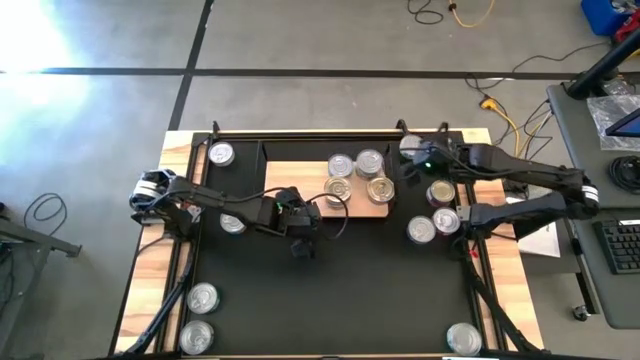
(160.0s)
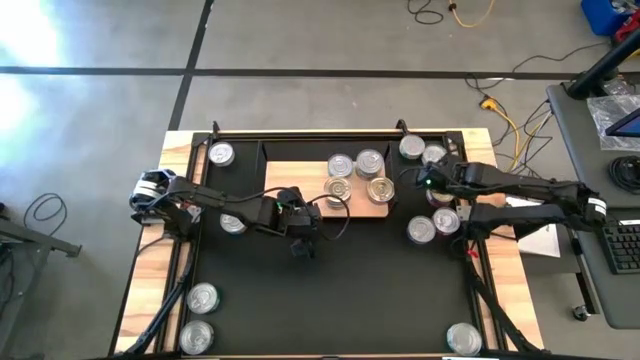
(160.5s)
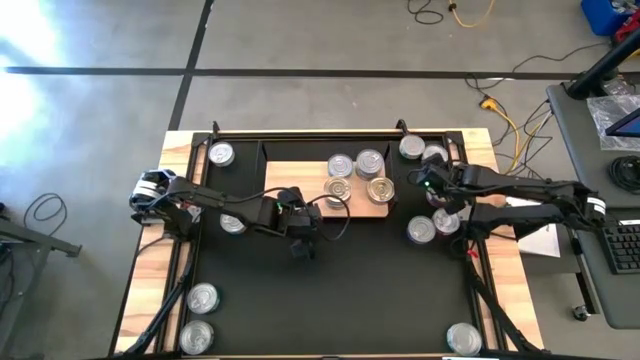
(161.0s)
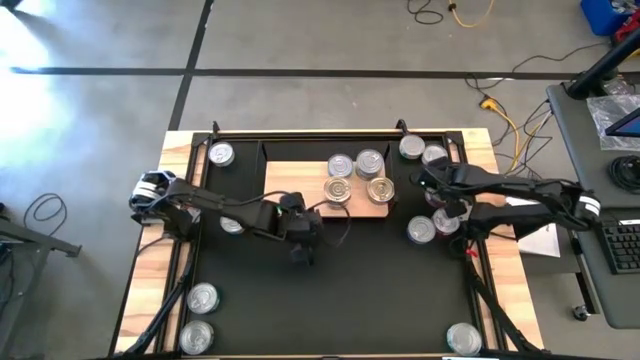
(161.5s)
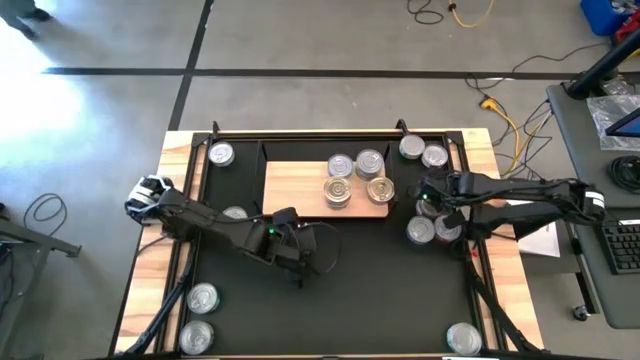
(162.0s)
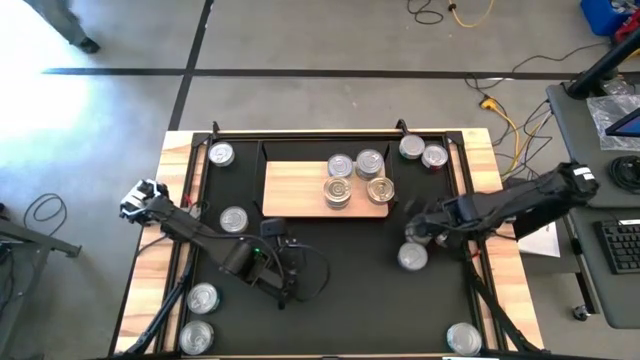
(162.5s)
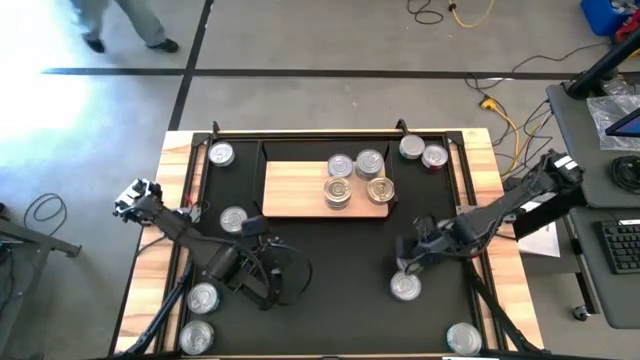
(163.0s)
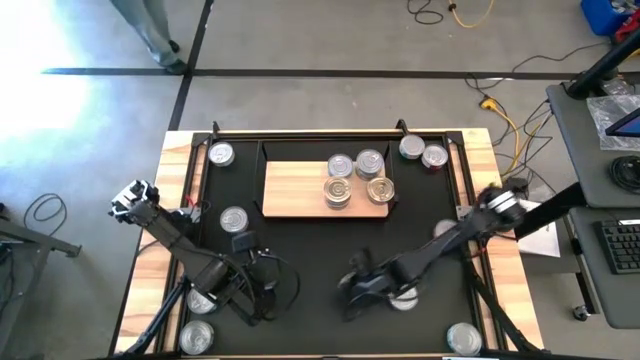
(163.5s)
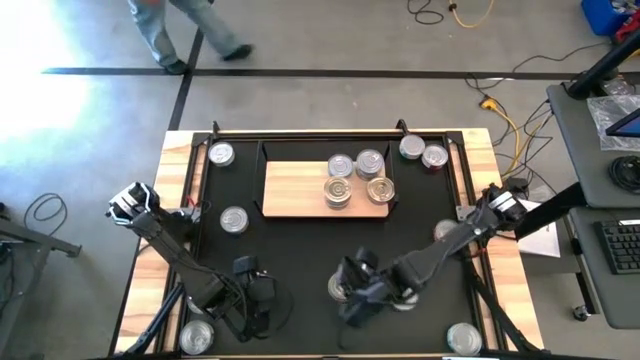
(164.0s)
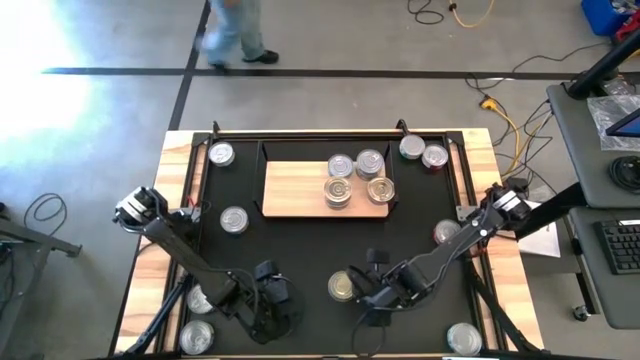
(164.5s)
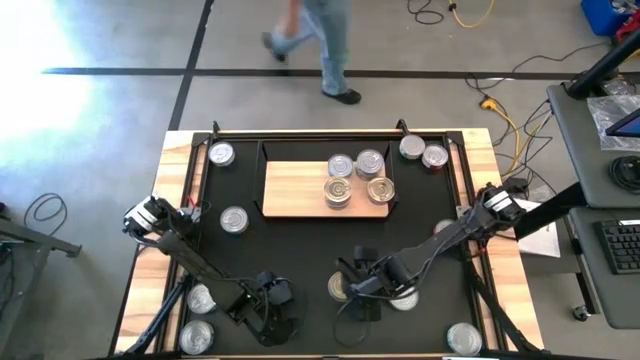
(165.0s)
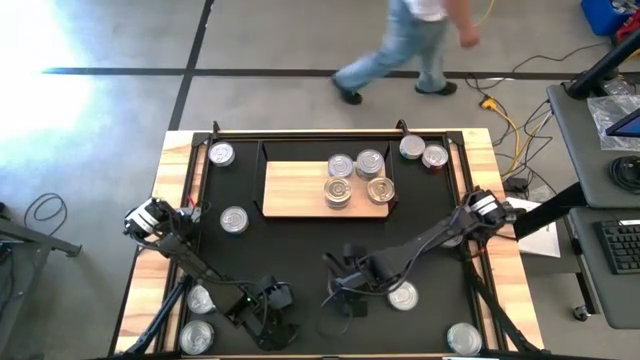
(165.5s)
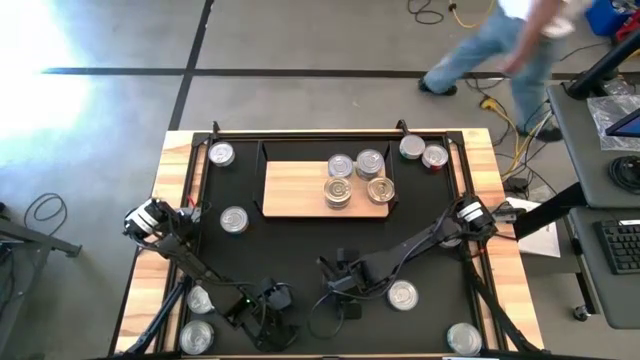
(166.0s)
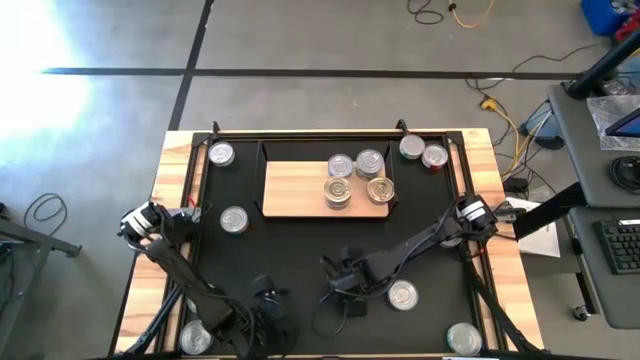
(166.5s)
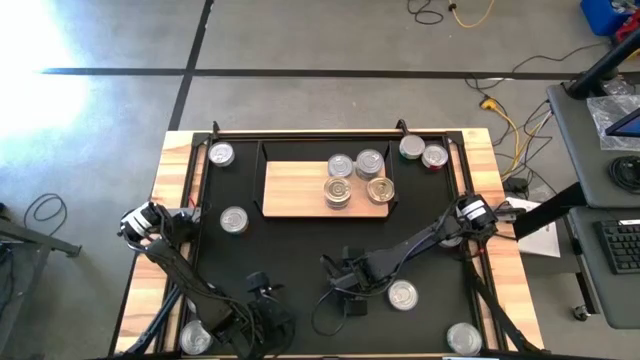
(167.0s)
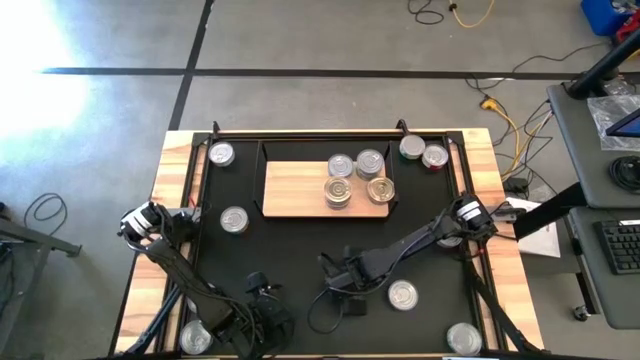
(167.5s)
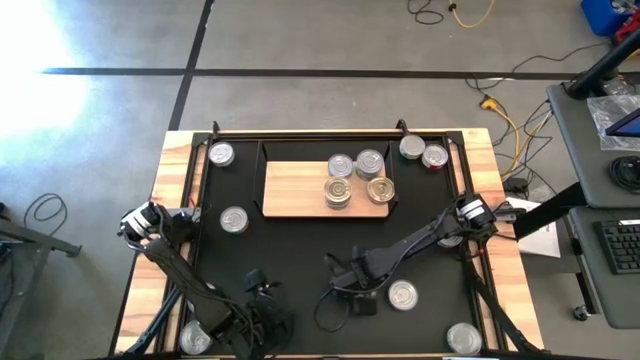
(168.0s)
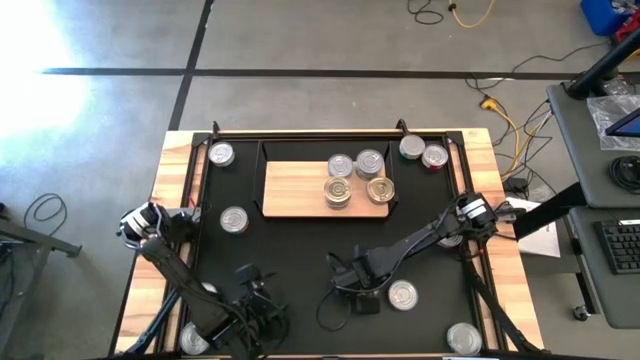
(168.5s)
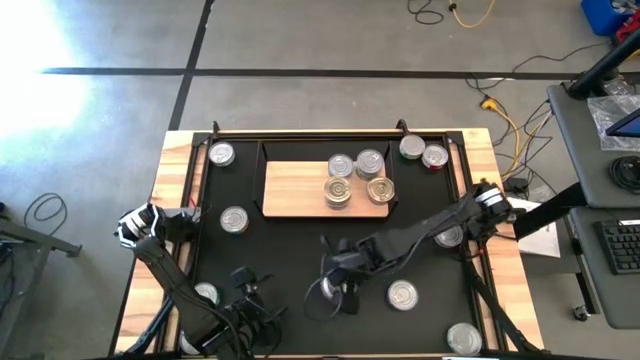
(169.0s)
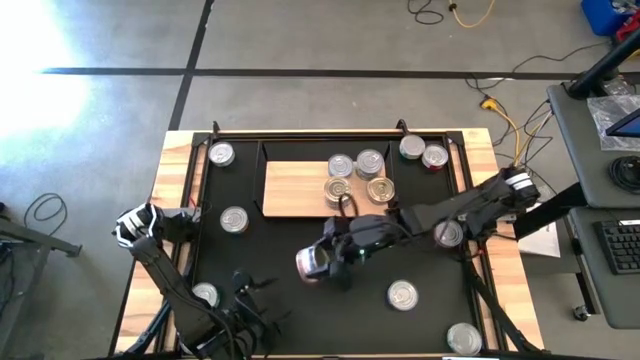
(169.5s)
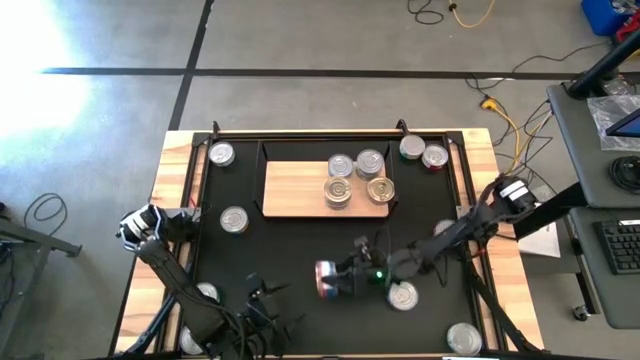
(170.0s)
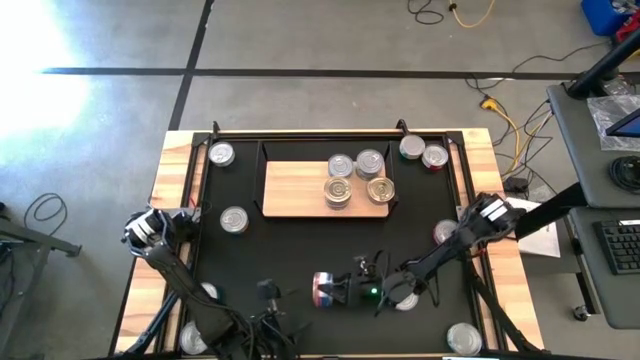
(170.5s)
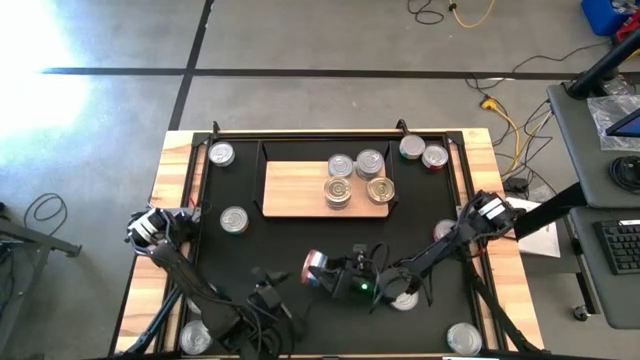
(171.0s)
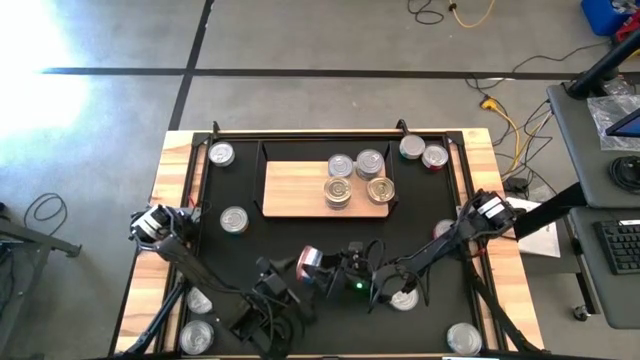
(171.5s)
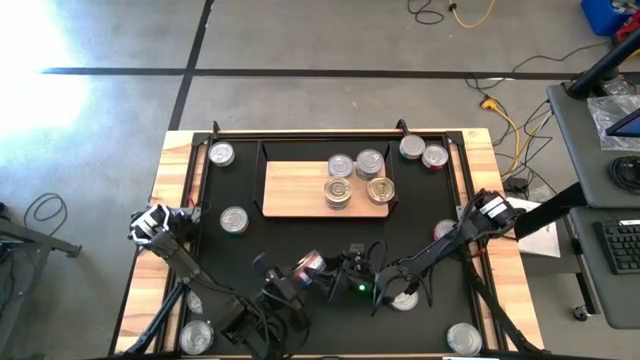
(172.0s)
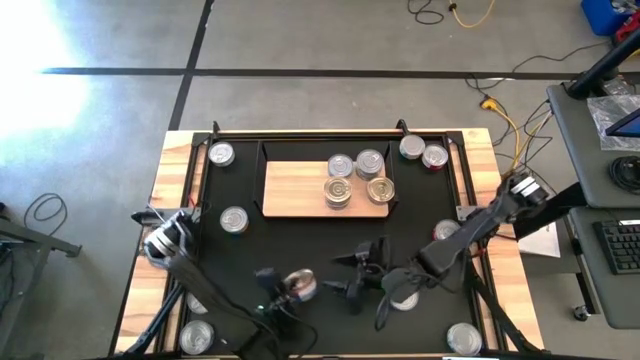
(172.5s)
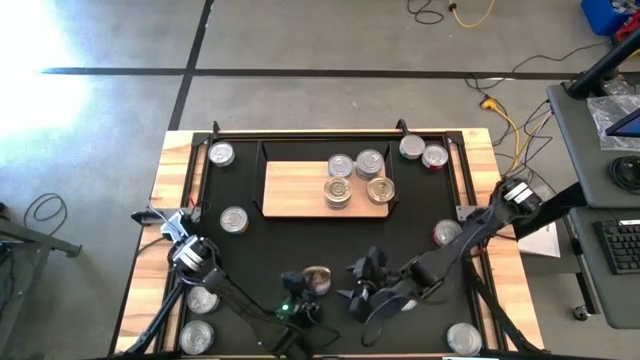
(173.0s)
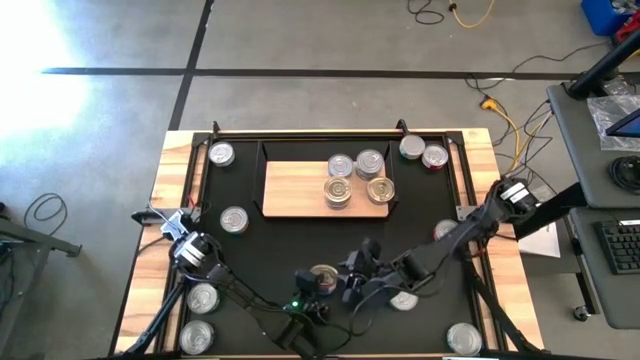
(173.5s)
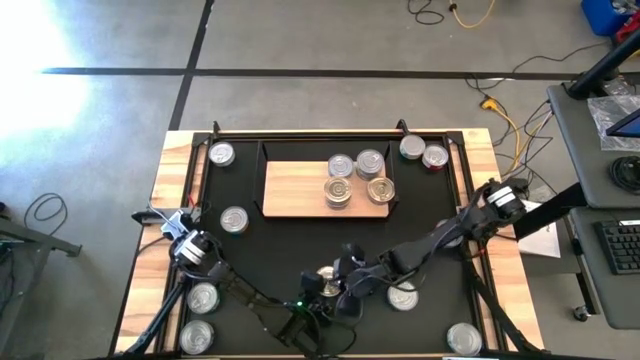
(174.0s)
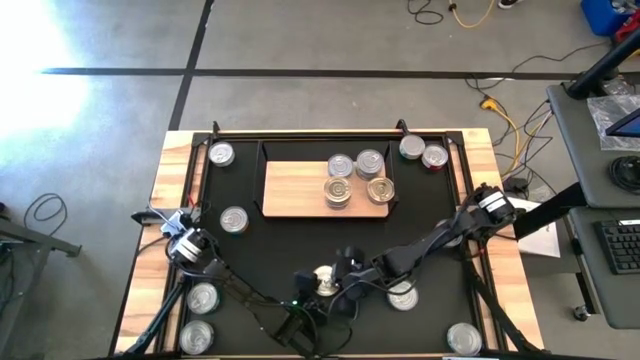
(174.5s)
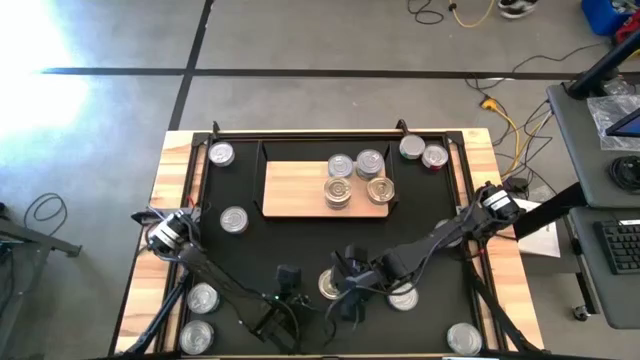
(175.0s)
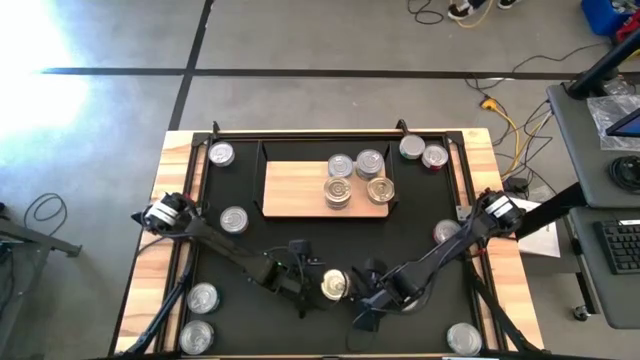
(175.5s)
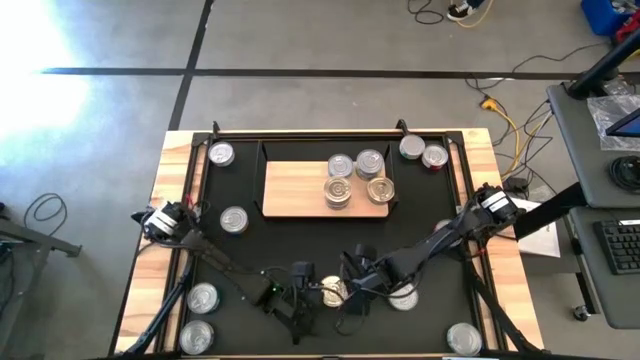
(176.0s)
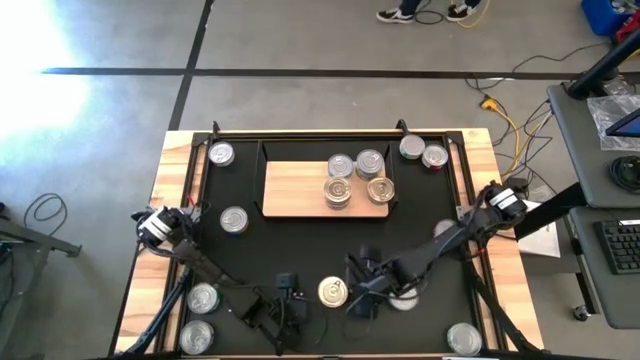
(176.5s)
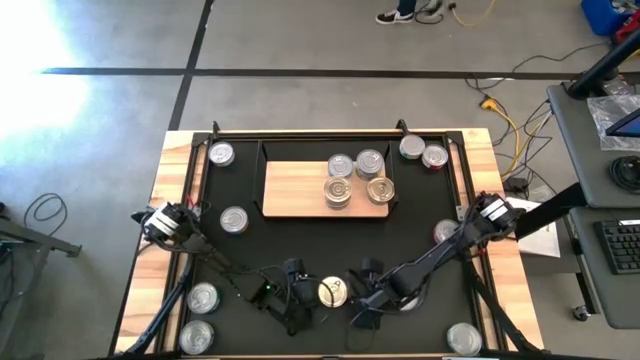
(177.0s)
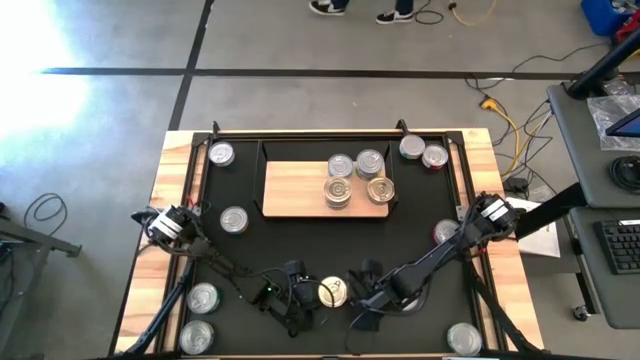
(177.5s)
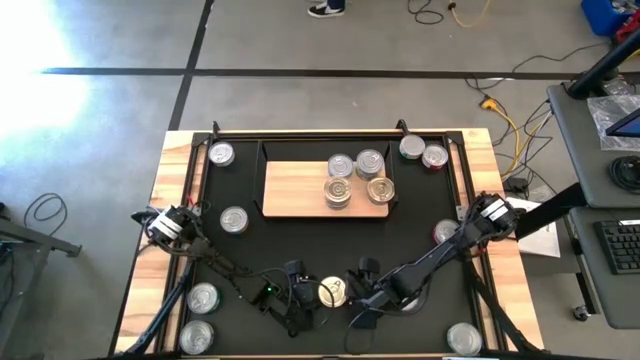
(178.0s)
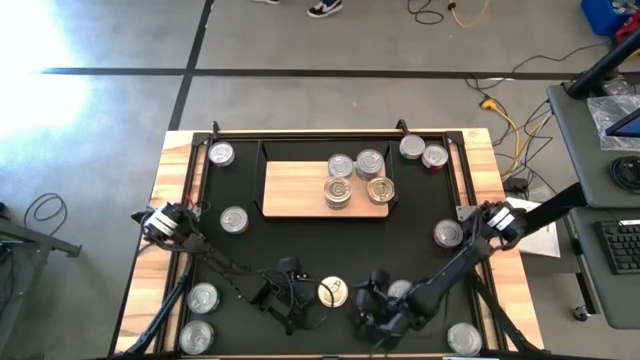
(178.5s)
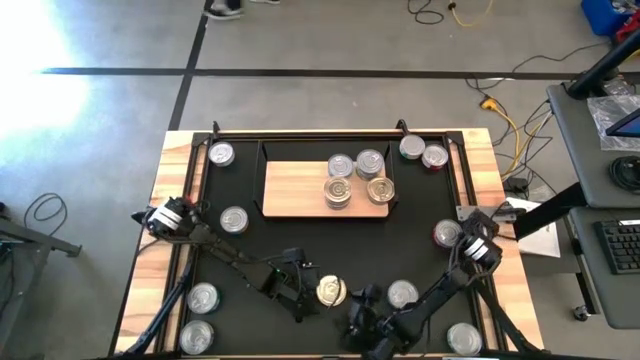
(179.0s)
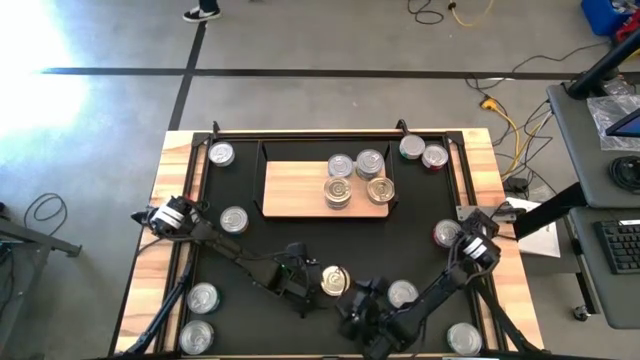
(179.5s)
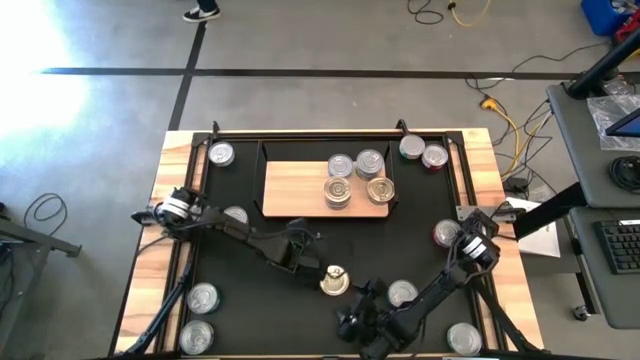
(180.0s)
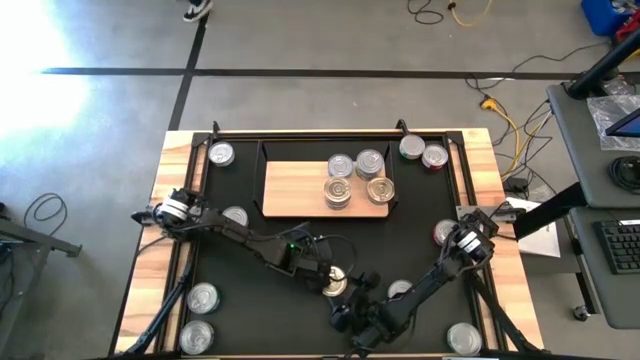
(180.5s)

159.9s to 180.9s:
Task: Stack canned seafood by type on shelf
Stack the blue and orange tuna can on the right blue and orange tuna can

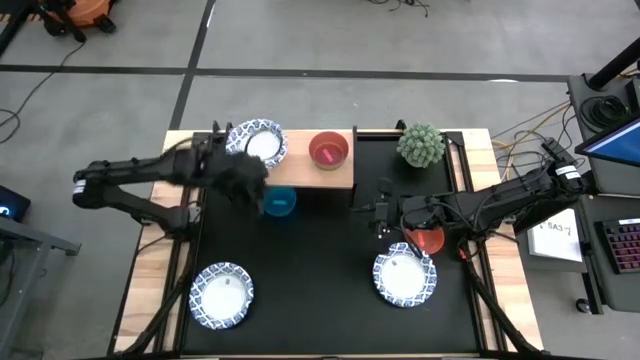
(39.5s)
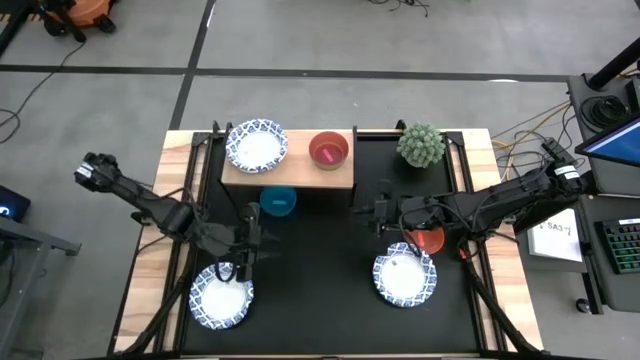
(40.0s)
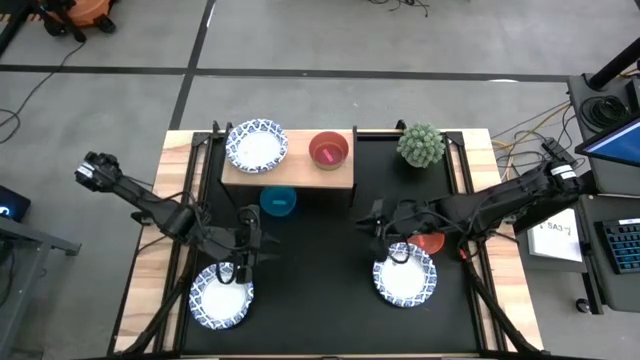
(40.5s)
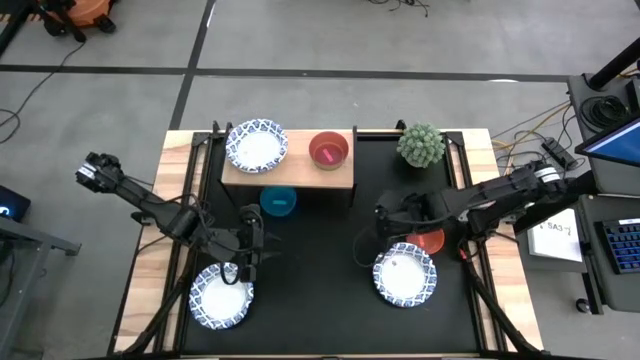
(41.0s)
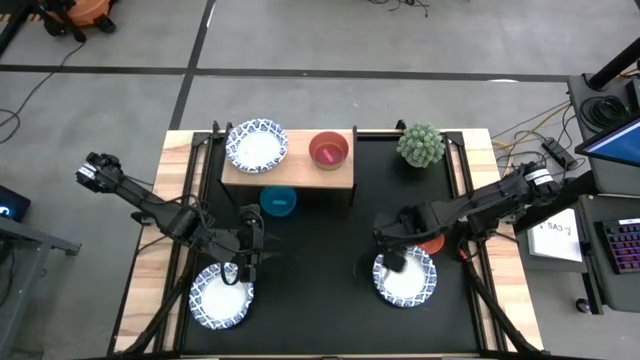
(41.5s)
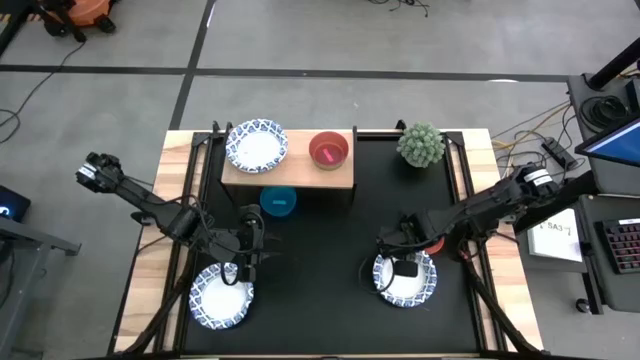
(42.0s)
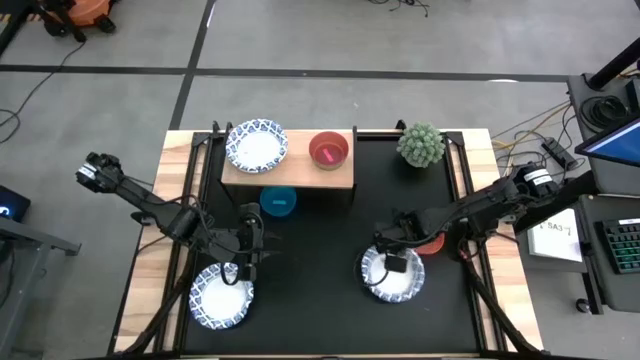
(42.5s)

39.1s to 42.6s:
Task: Place and stack bowls onto a shelf
Stack the white bowl on top of the other white bowl on the shelf
